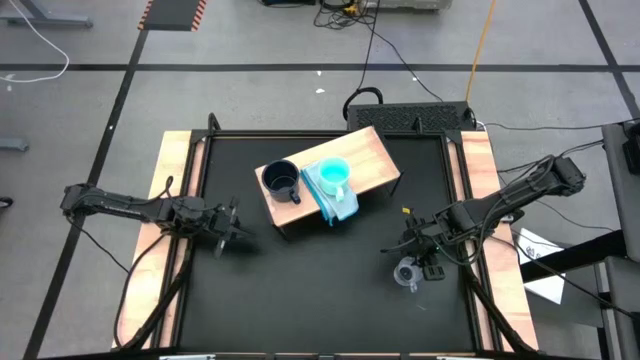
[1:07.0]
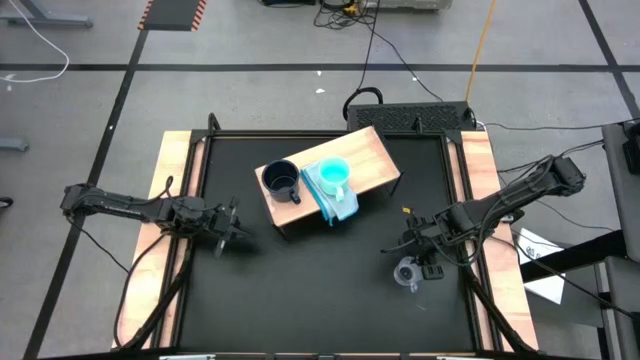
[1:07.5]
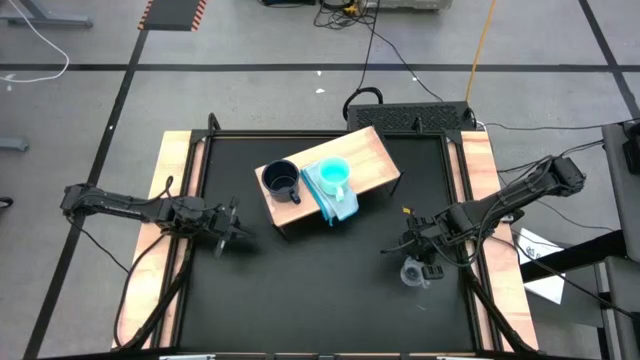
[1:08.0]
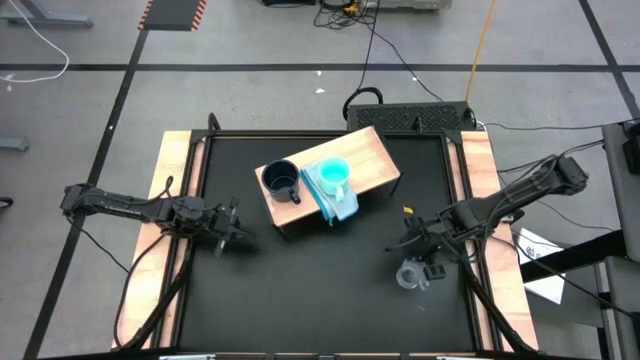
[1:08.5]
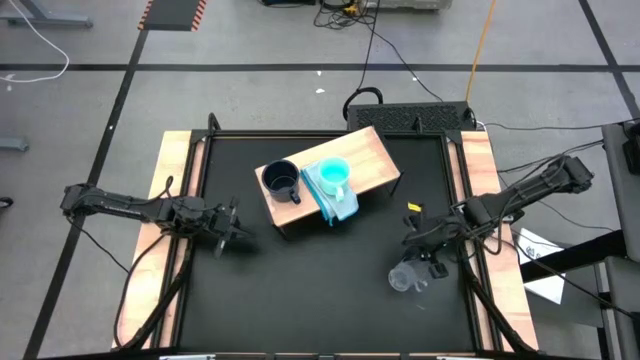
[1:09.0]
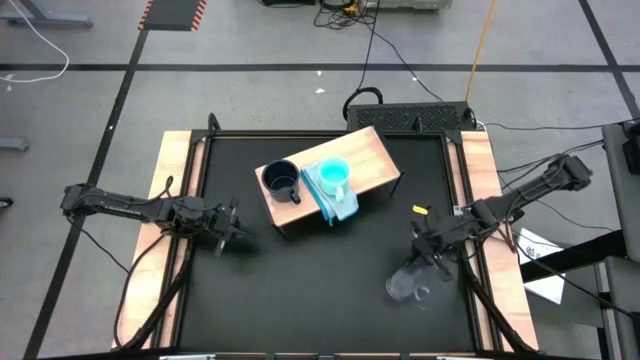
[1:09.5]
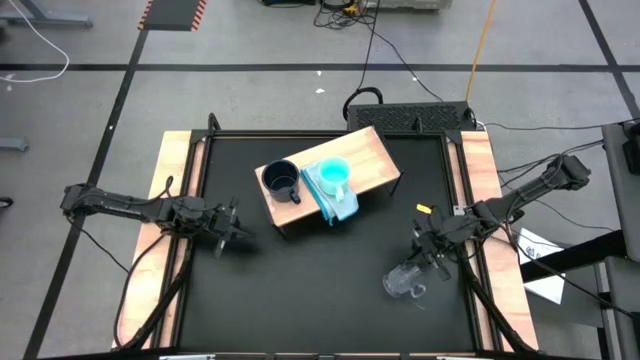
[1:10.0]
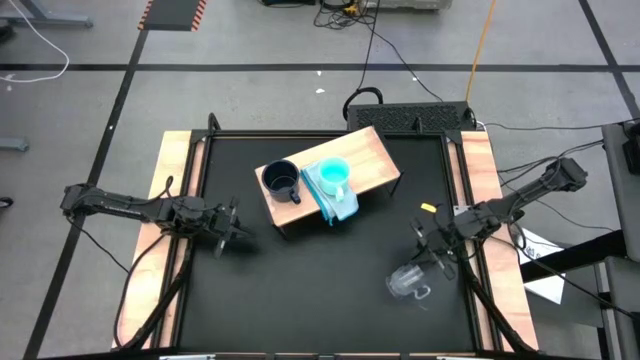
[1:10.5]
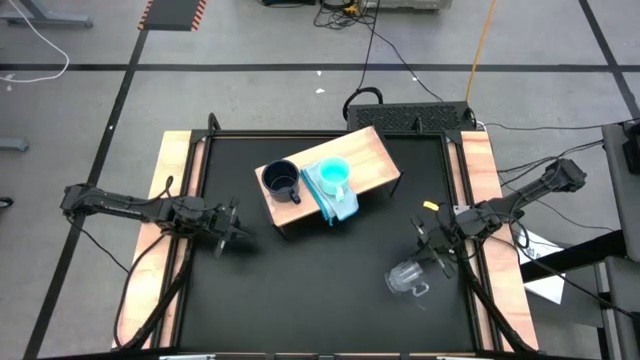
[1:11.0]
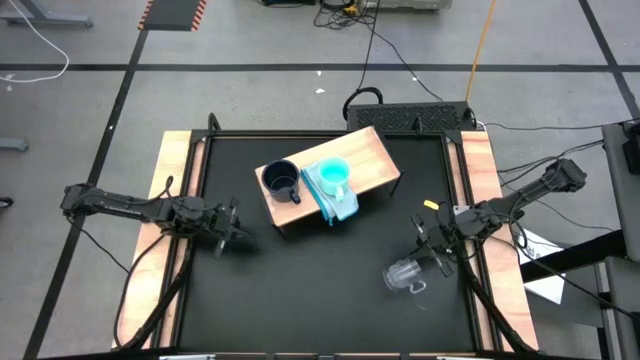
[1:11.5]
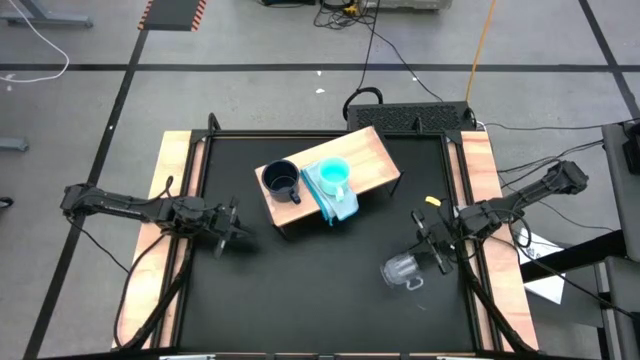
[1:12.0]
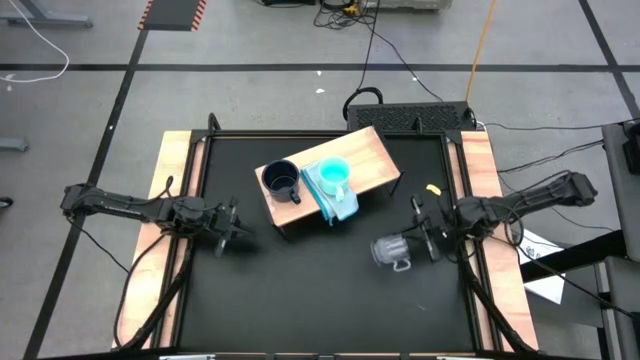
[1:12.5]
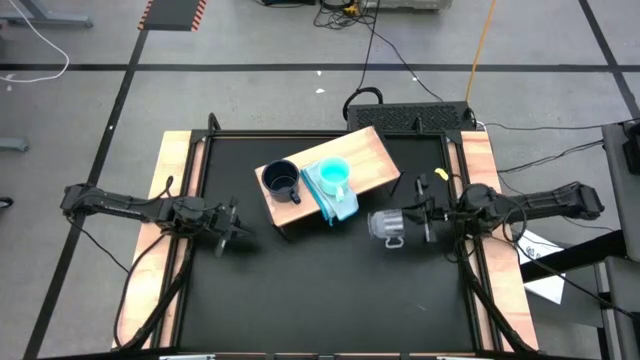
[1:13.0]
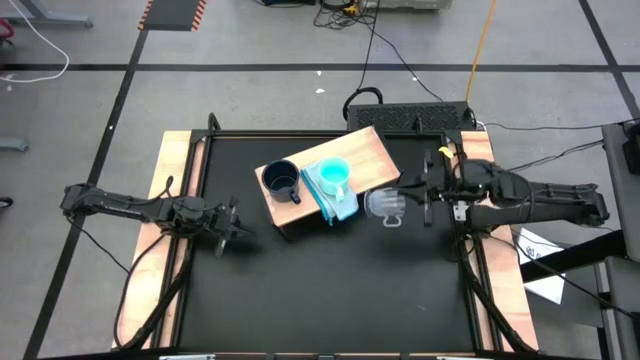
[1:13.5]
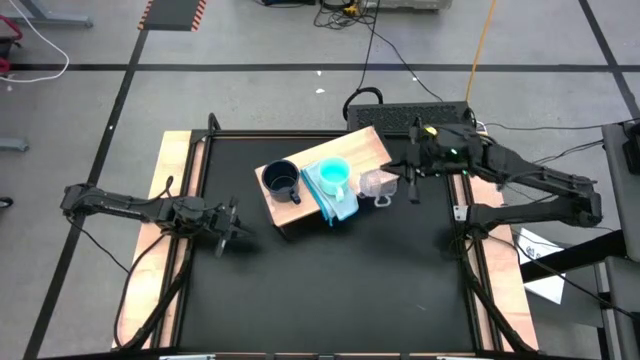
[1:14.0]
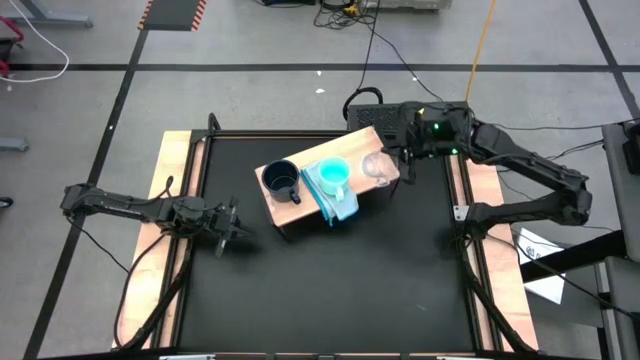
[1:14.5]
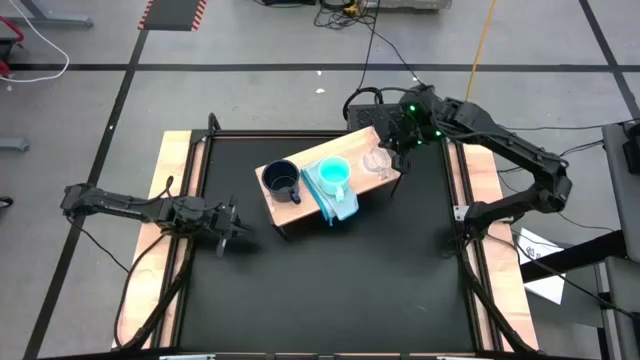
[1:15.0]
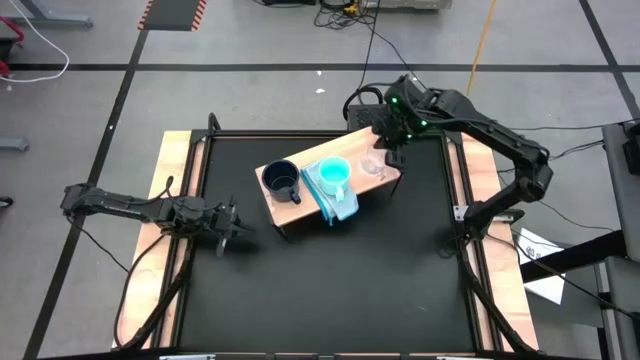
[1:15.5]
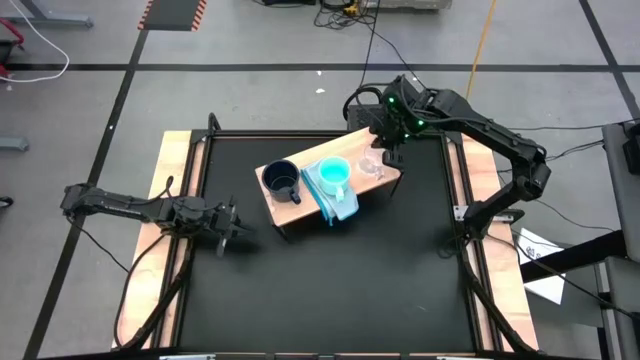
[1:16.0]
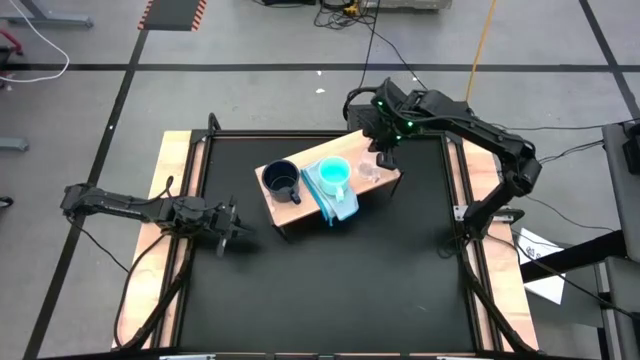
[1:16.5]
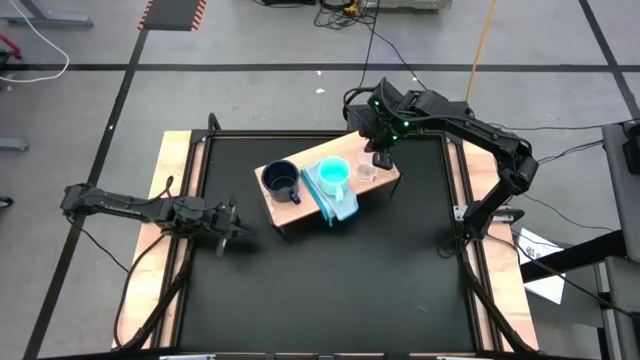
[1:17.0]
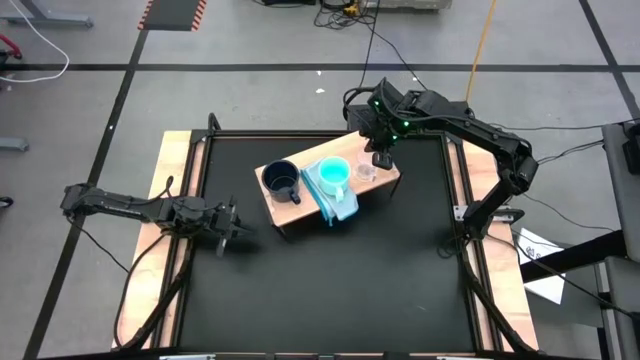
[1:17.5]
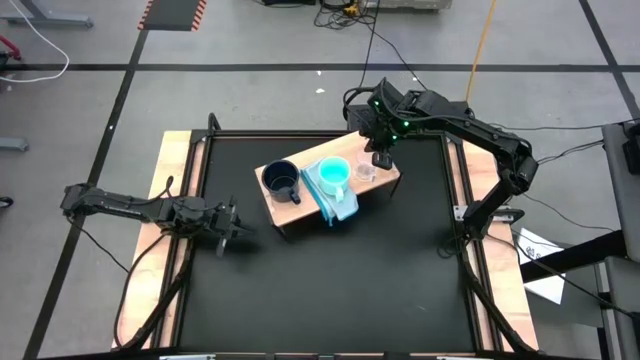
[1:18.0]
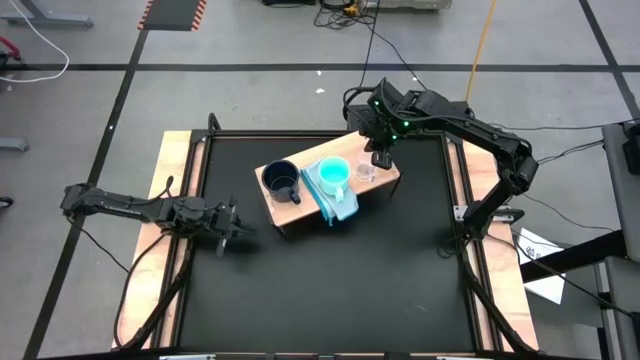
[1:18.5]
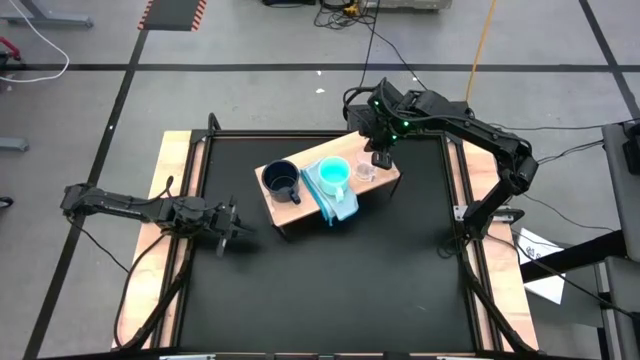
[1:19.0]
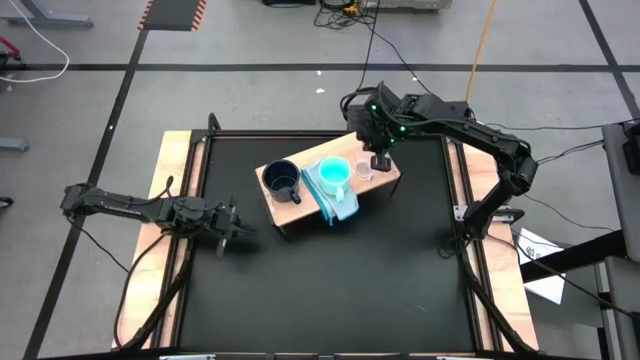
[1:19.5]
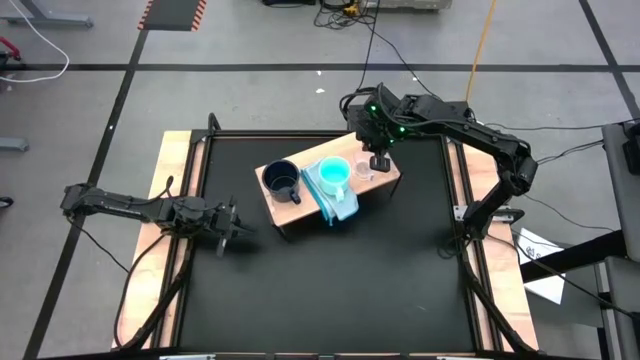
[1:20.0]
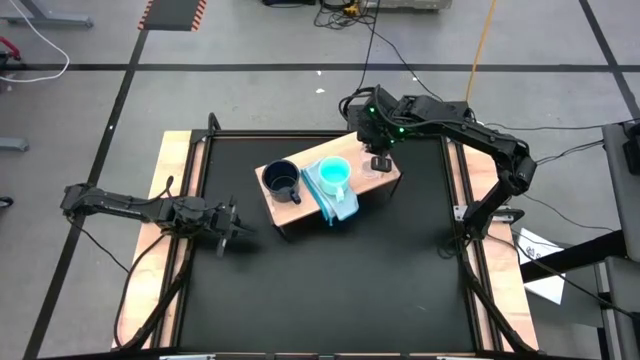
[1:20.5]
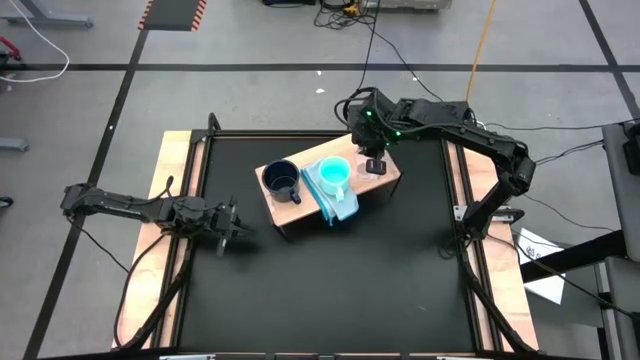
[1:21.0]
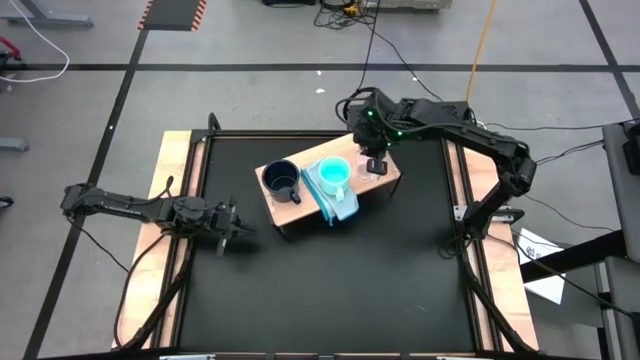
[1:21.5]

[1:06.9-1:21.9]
Task: Stack small to large cups/mugs on shelf
Put the transparent mug to the right on the shelf

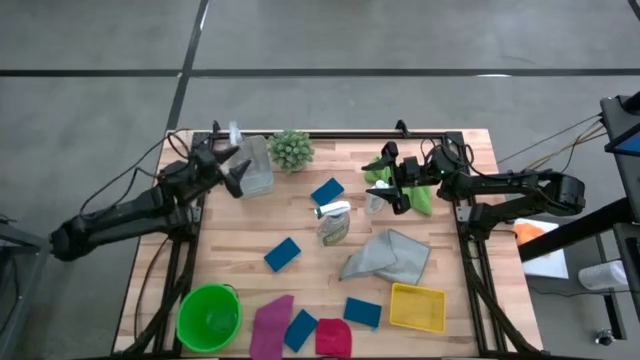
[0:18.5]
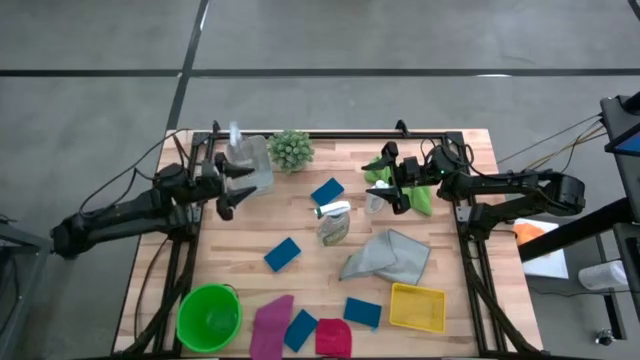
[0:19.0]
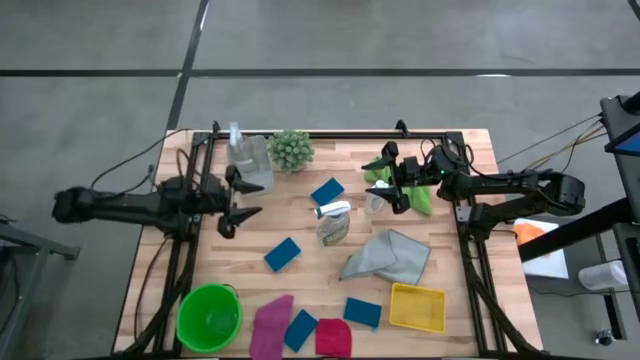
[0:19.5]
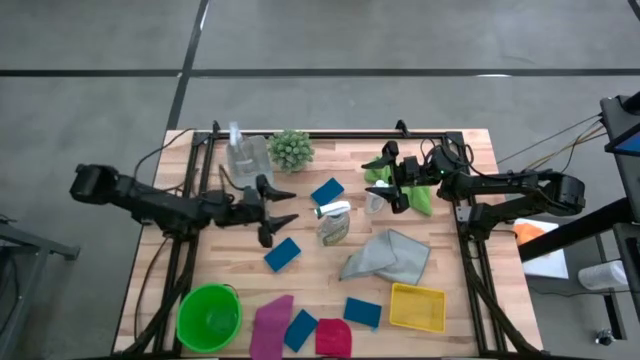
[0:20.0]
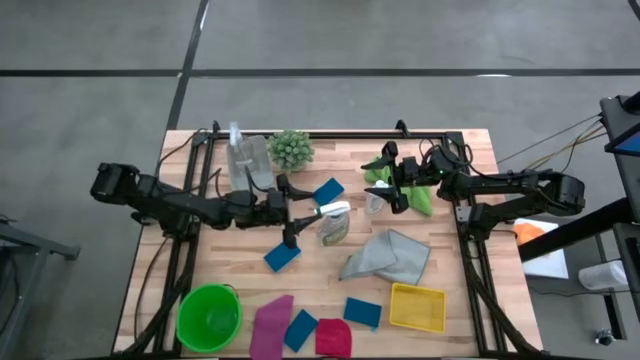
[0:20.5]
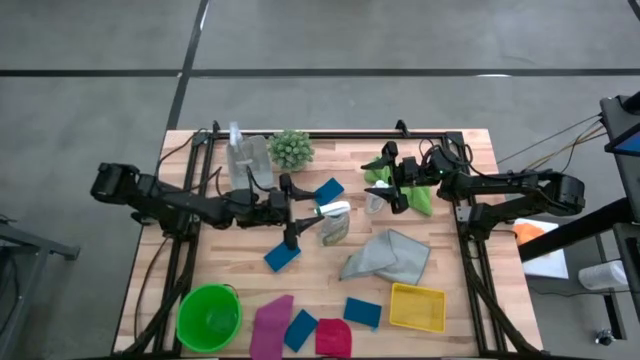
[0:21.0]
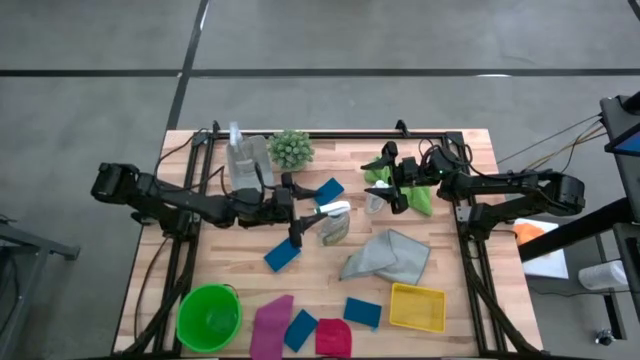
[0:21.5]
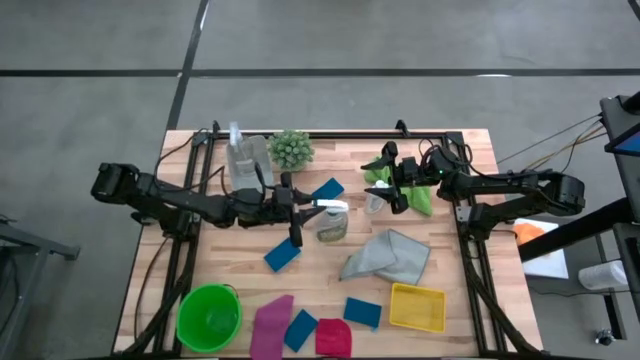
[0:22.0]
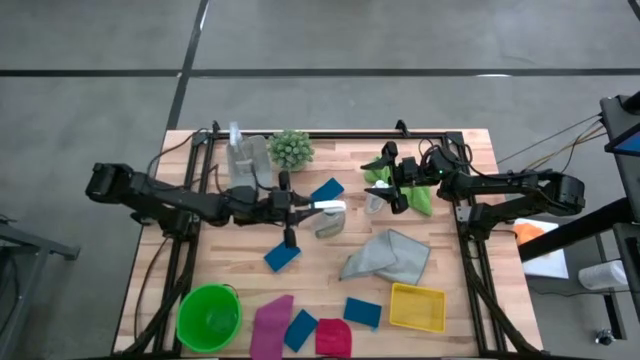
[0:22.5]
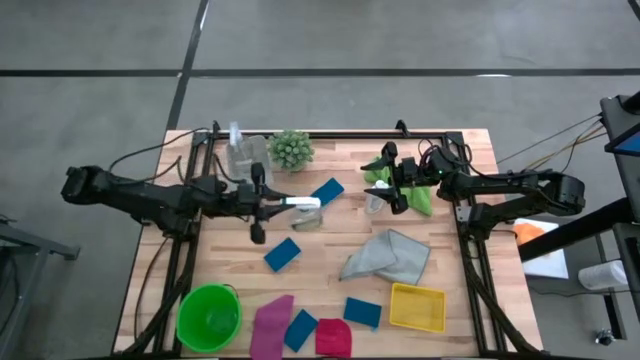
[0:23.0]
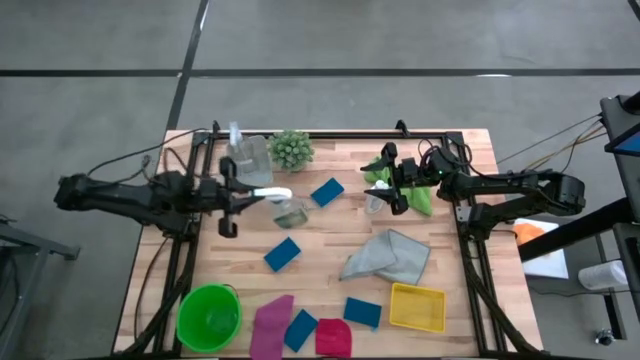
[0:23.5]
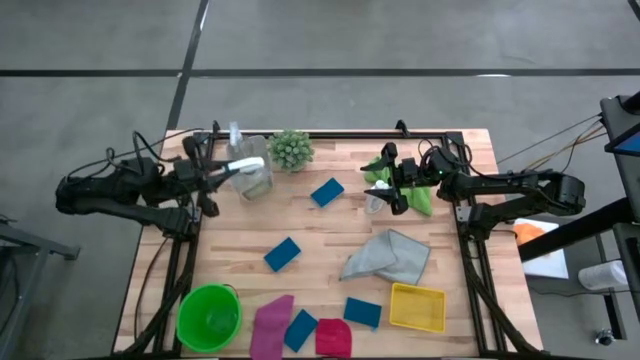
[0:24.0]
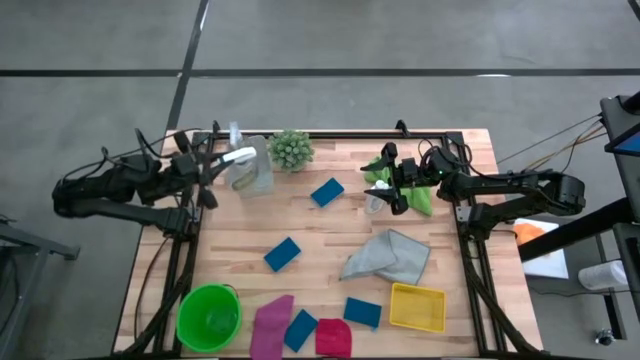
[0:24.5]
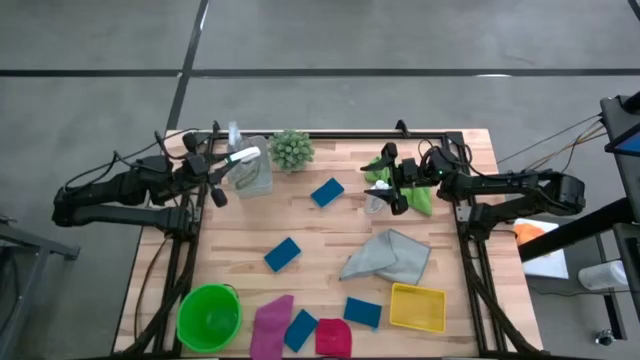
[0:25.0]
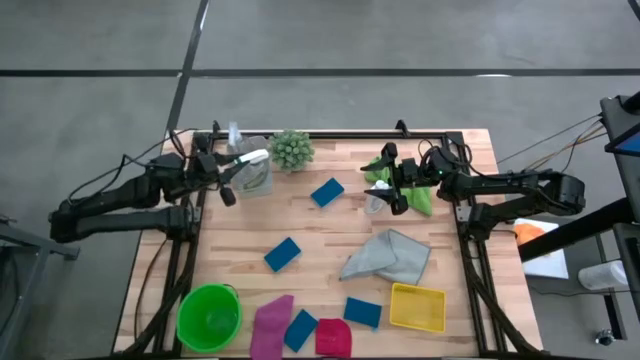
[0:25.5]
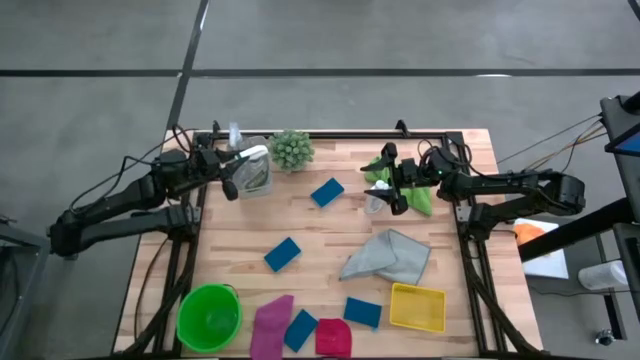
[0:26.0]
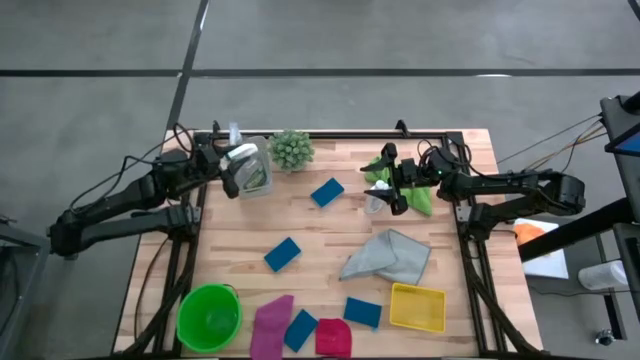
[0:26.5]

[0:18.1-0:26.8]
Task: Pick & Place Kitchen Items
Put the green spray bottle into the gray bin
